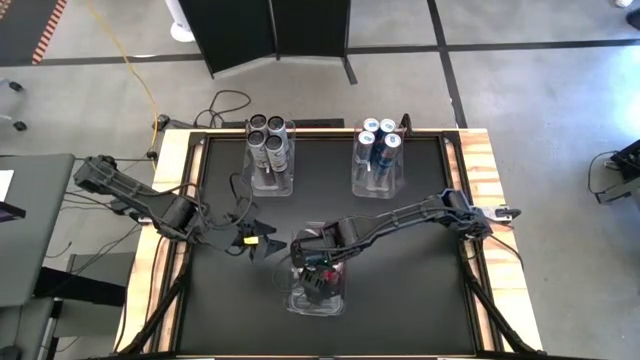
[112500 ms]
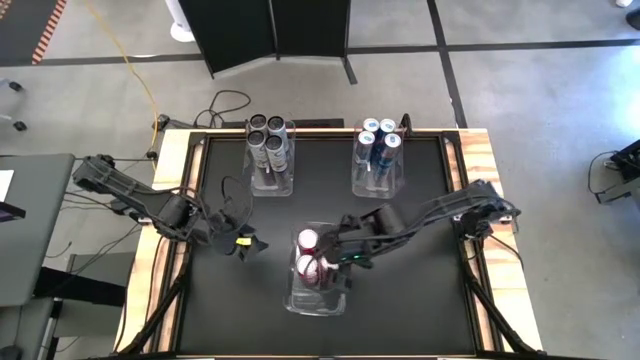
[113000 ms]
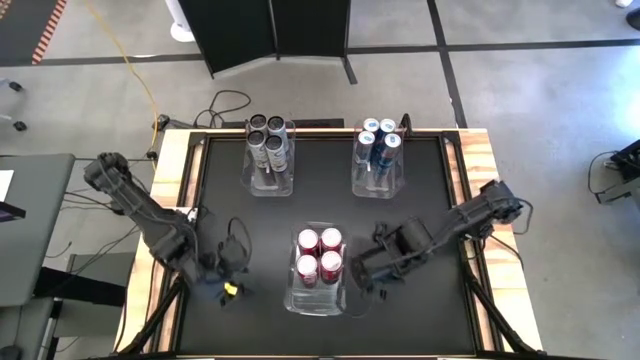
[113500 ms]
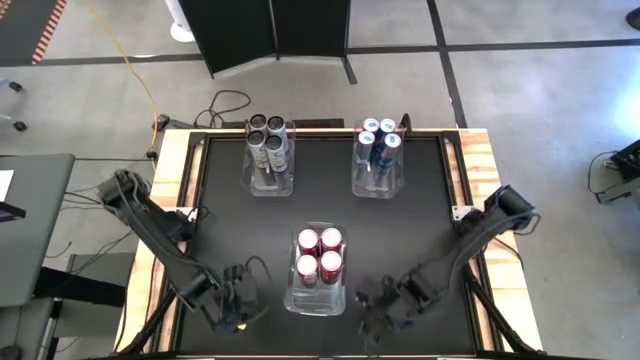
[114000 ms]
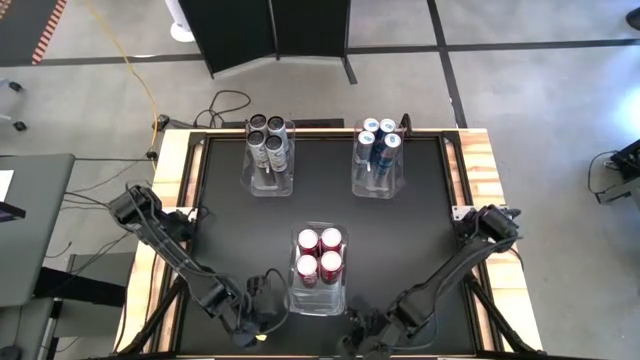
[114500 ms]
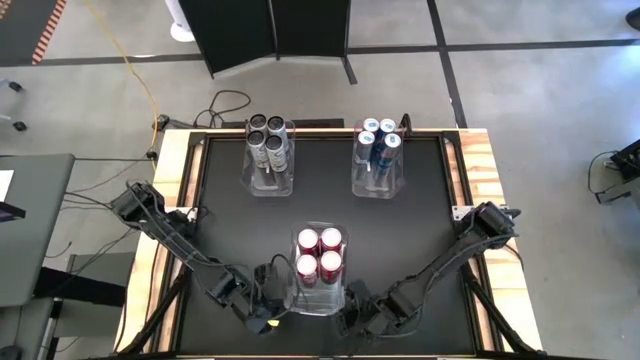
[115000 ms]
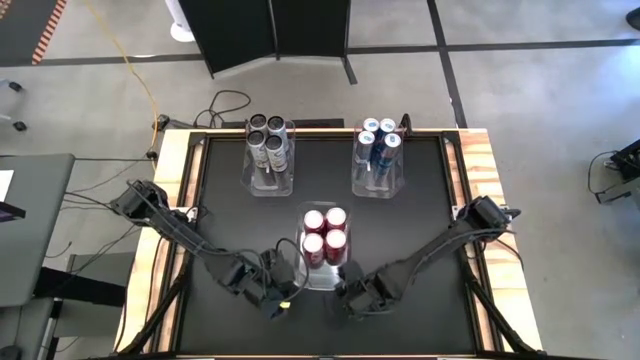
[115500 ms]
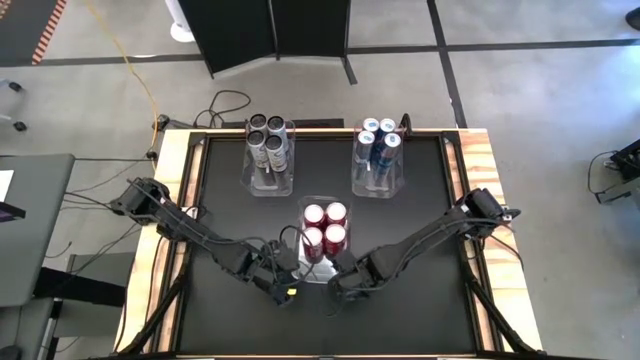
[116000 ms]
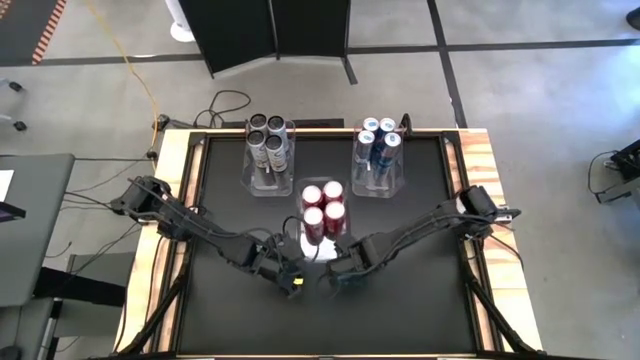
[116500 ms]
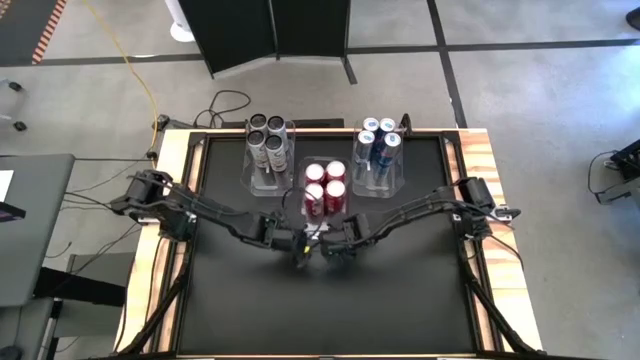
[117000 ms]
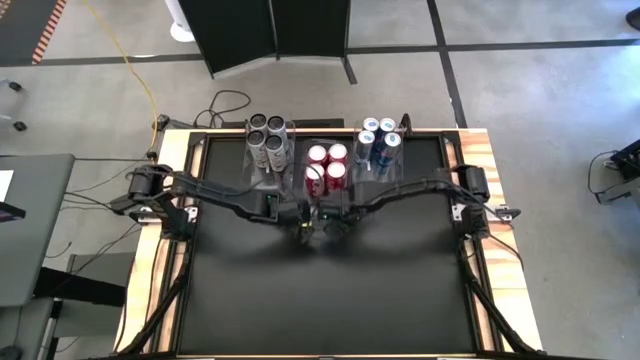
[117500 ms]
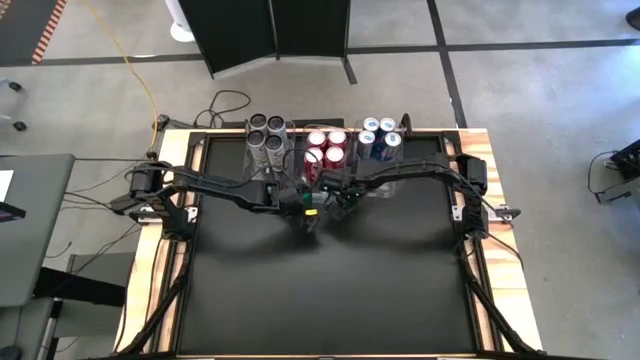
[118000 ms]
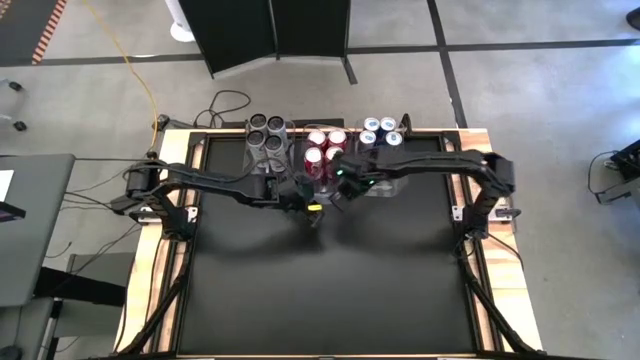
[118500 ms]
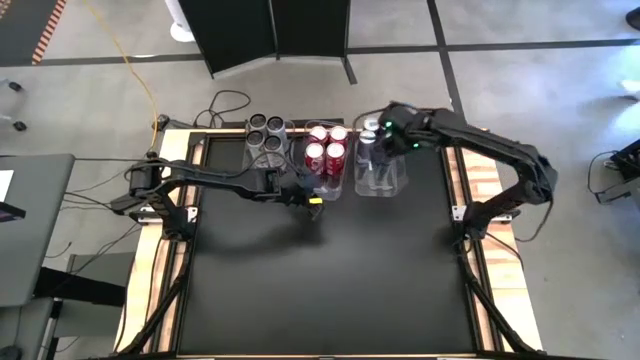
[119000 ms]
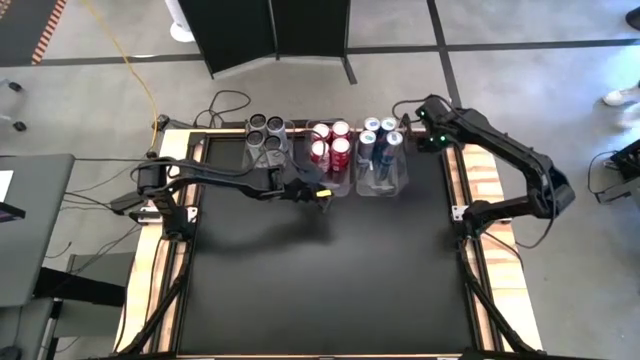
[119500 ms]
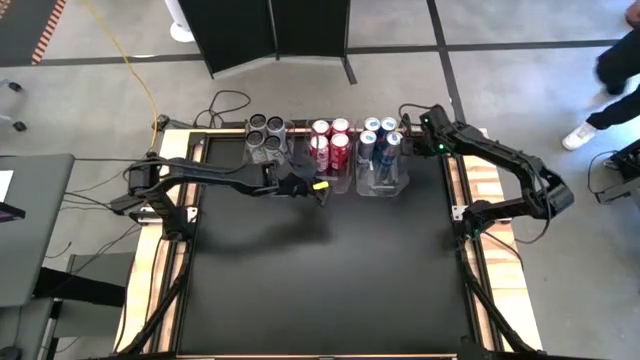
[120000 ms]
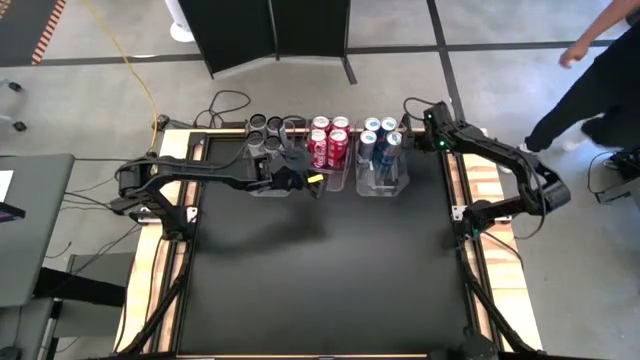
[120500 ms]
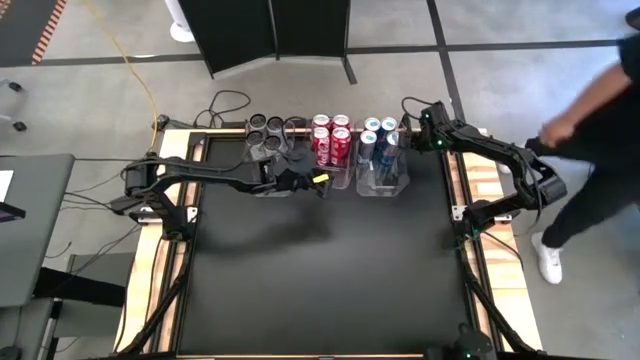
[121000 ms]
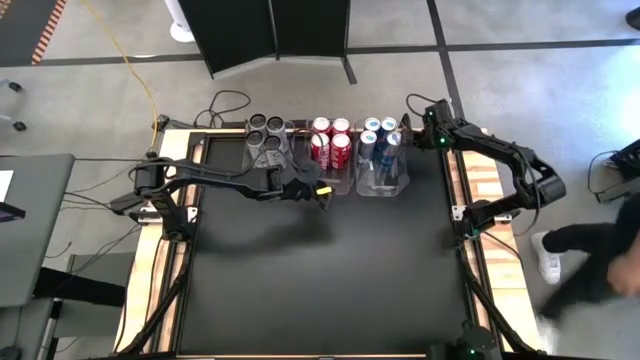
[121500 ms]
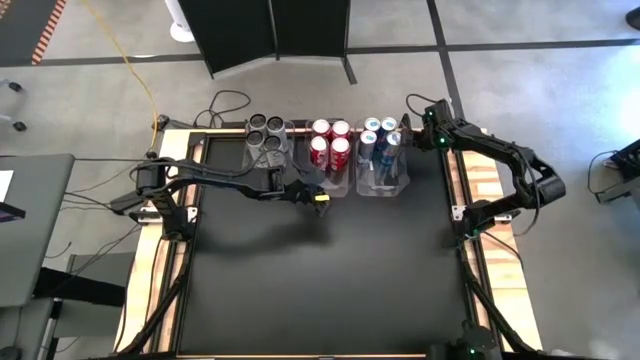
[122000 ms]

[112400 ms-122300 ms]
Task: Sort soda cans
Move the bottom transparent bin into the top middle of the table

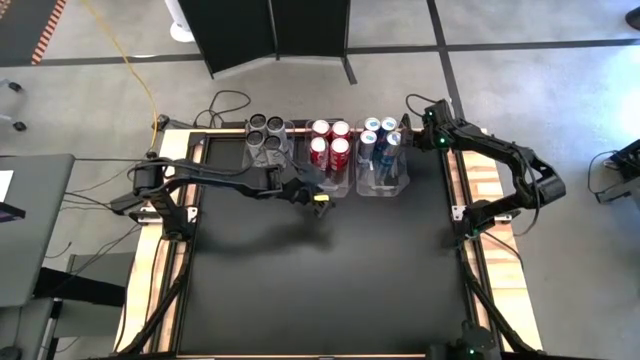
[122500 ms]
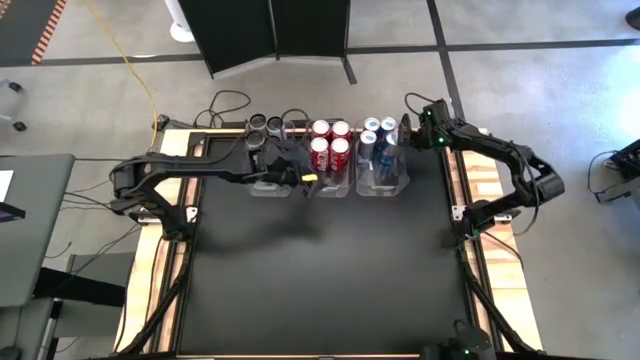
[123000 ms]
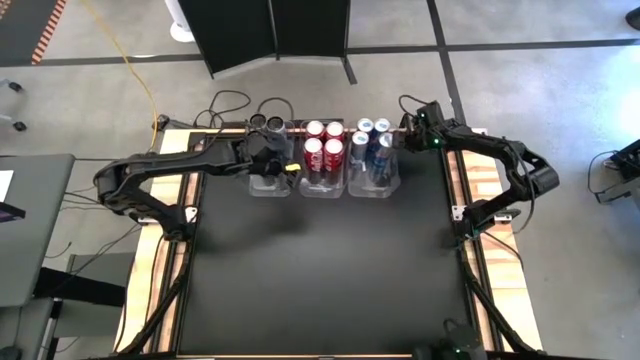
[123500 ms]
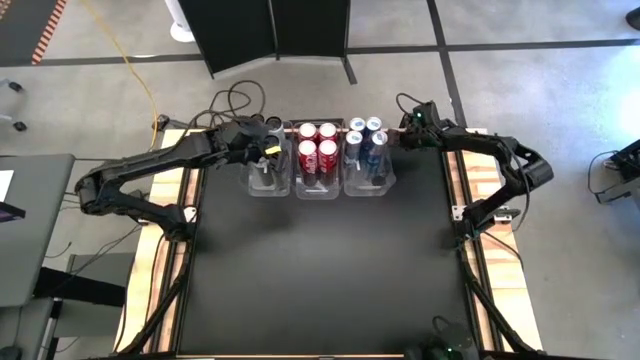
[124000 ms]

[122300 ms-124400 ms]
Adjust the right transparent bin

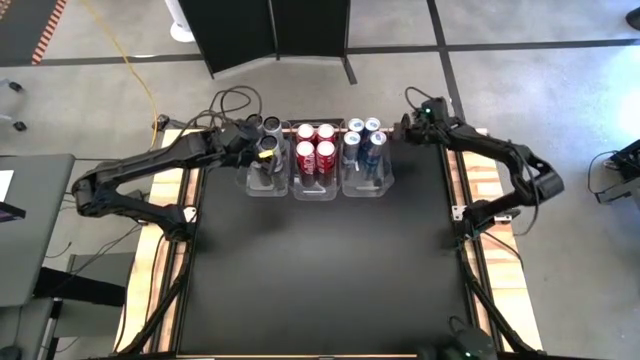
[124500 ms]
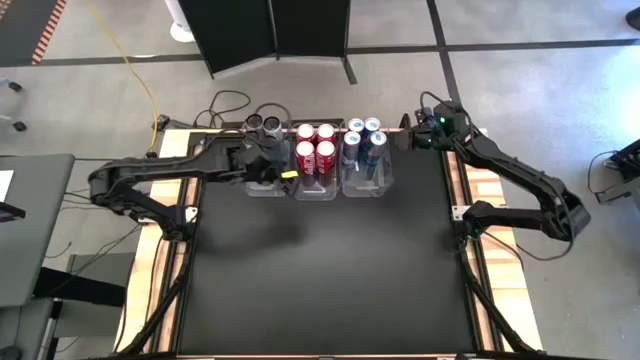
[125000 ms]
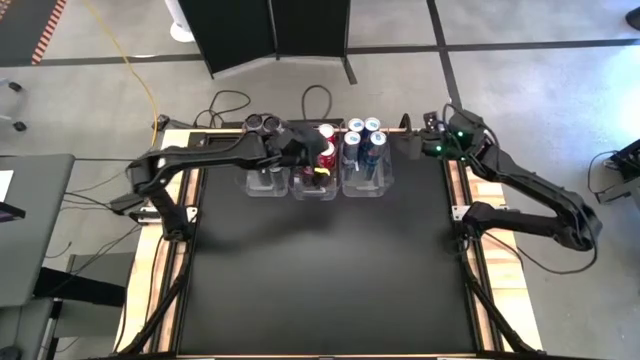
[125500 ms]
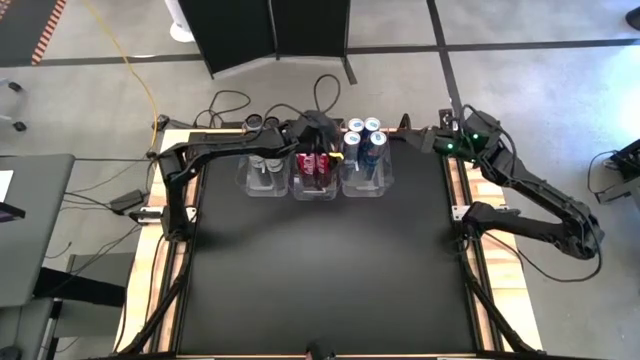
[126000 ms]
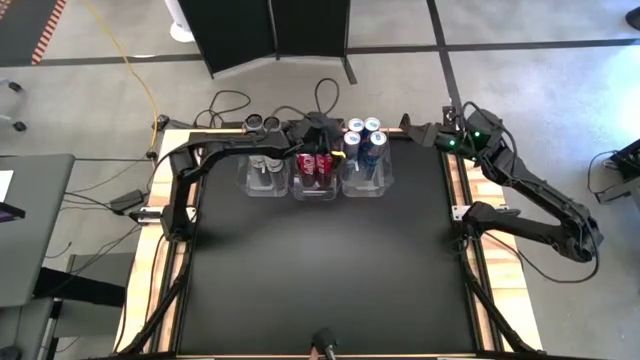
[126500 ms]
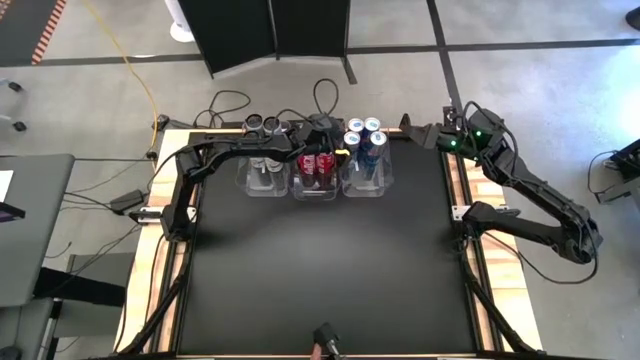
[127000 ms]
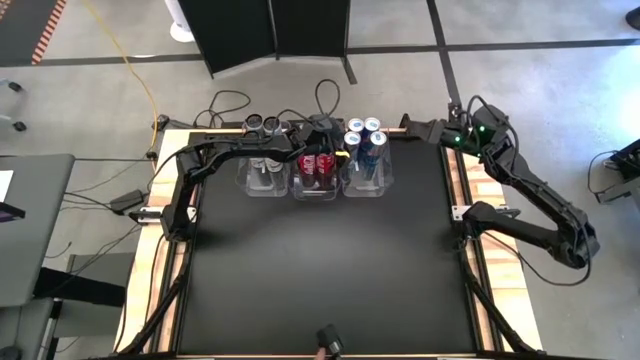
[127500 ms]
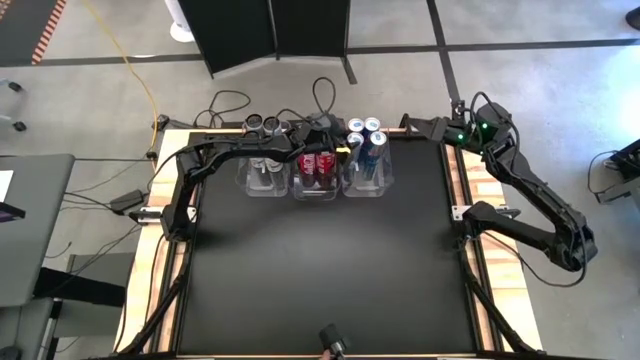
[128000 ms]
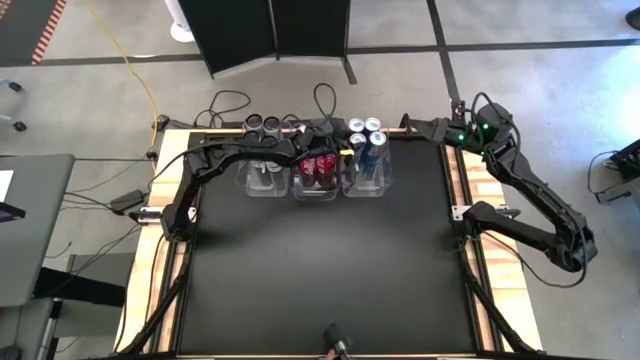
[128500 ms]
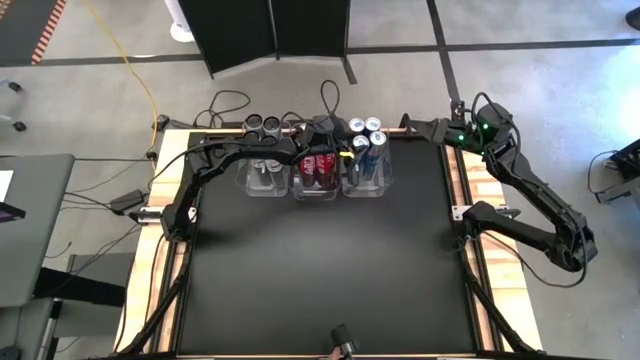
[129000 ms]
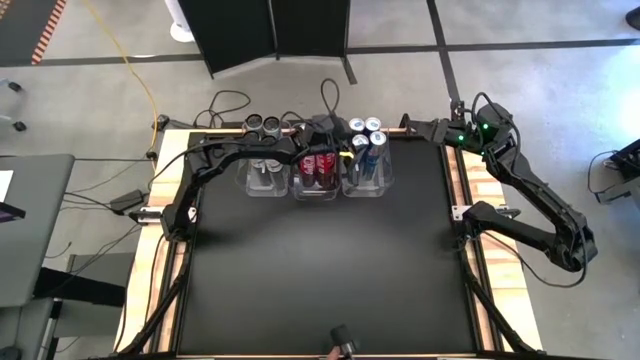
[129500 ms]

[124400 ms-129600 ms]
Adjust the blue soda can

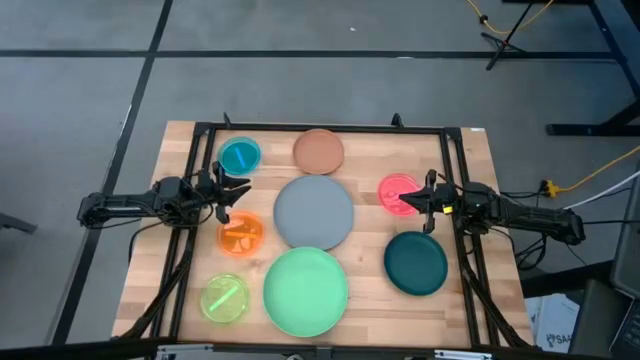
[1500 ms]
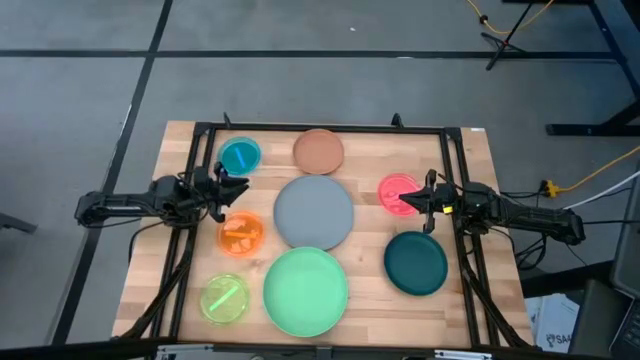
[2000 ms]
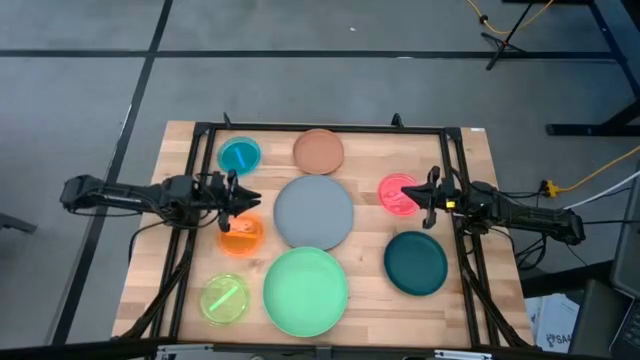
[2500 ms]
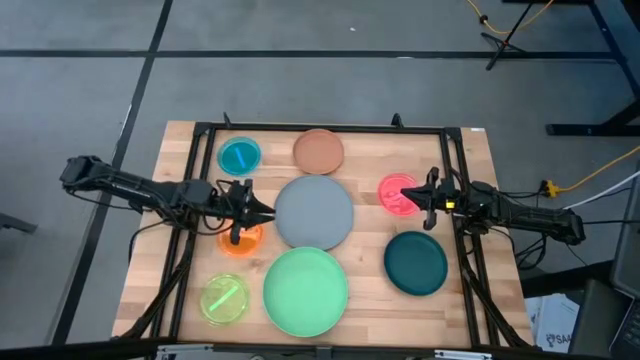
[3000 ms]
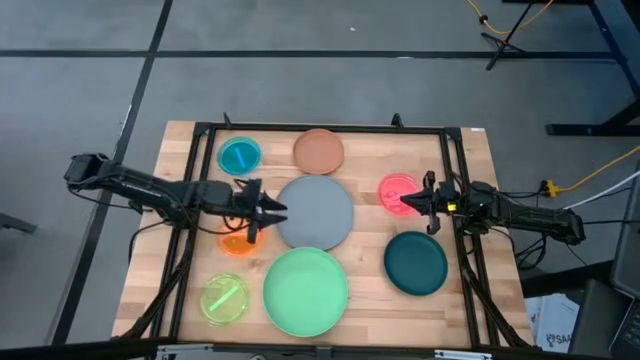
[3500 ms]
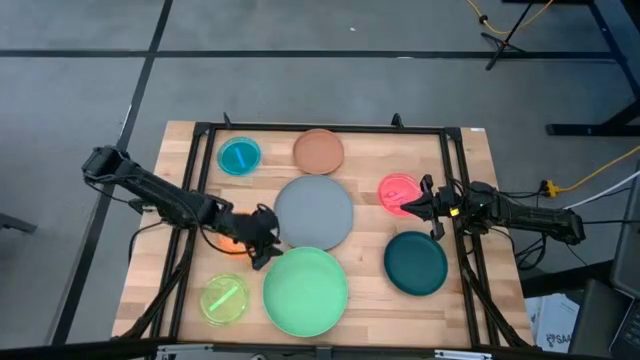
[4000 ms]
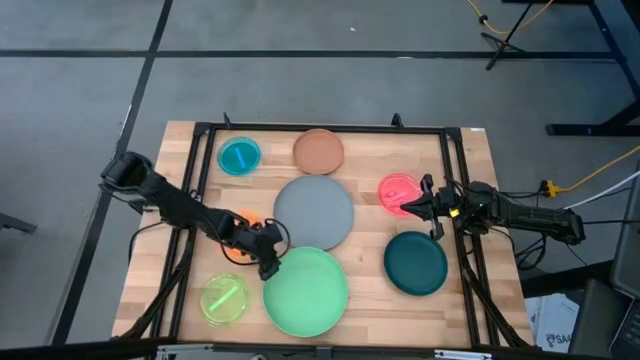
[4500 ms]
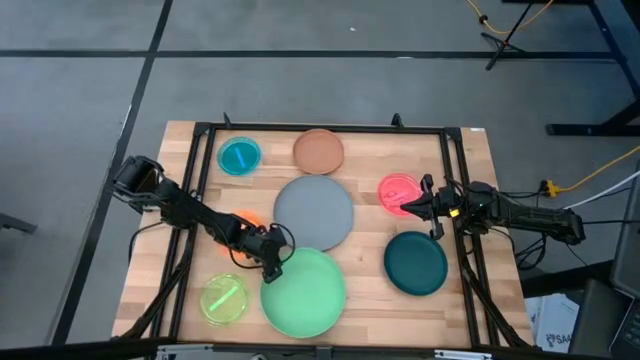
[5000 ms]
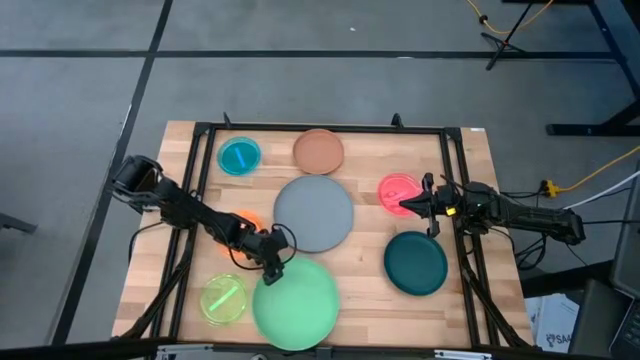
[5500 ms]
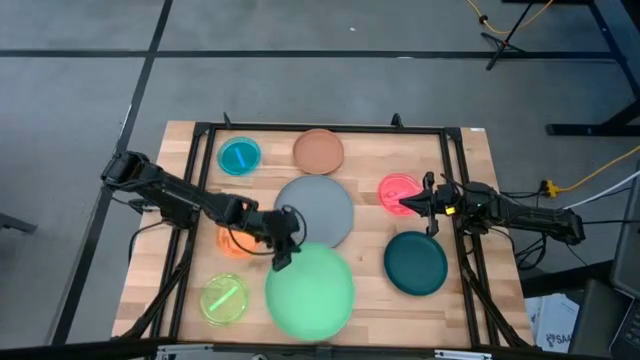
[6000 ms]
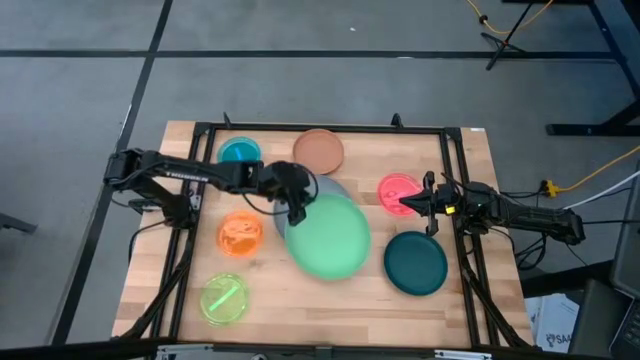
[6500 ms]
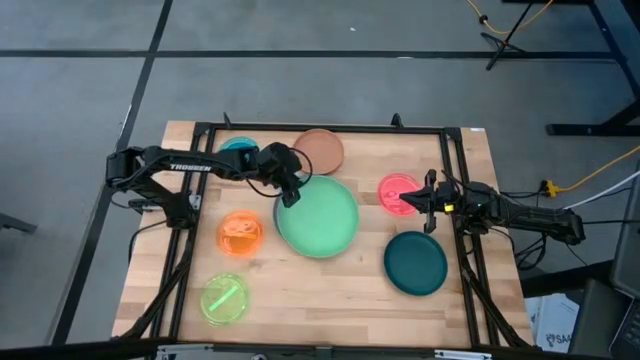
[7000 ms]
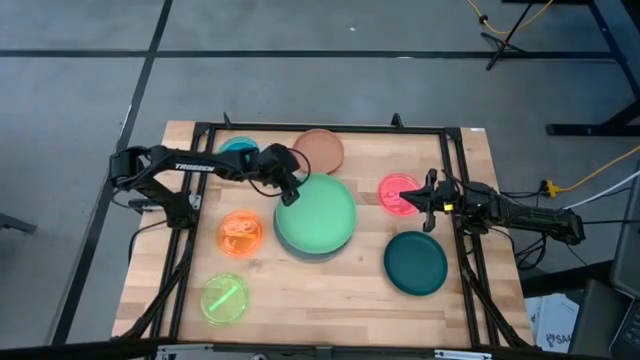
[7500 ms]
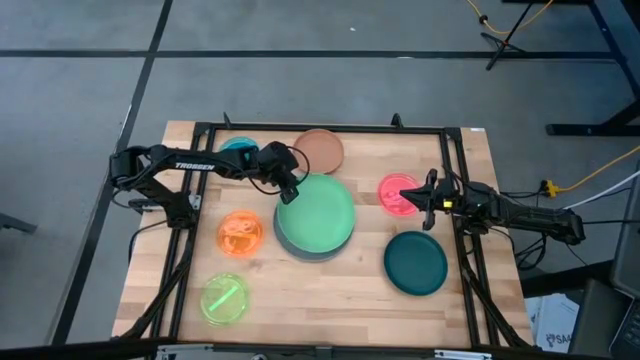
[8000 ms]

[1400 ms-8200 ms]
Task: Stack plastic plates
Stack the green plate on top of the gray plate
